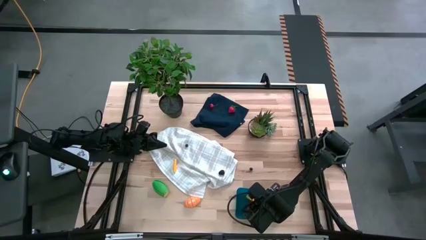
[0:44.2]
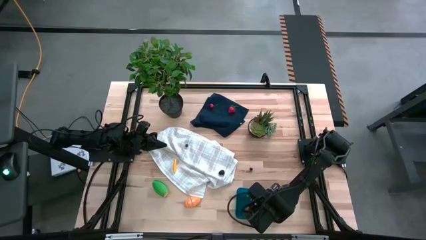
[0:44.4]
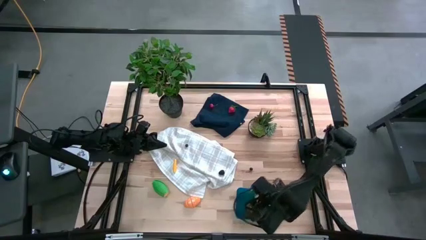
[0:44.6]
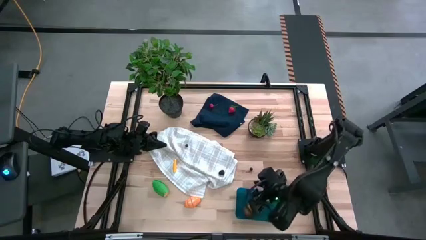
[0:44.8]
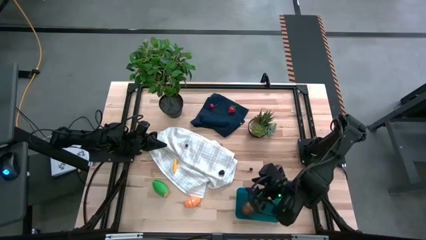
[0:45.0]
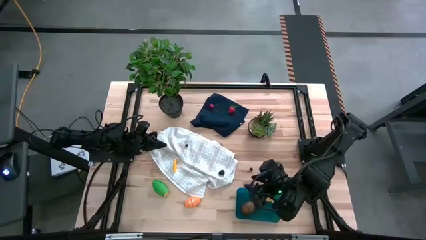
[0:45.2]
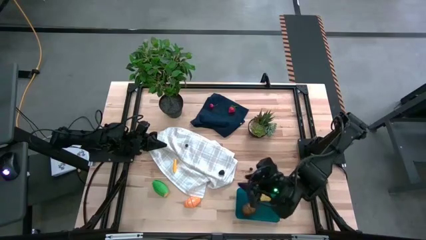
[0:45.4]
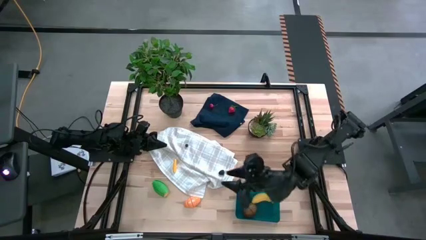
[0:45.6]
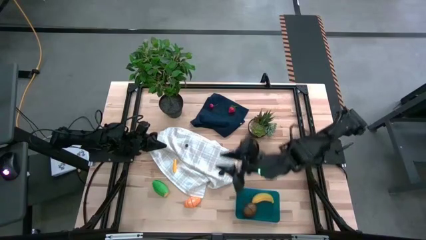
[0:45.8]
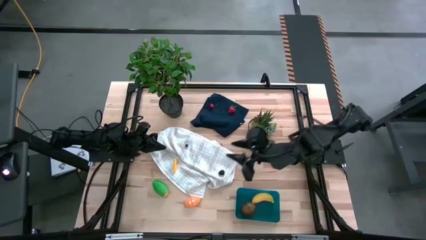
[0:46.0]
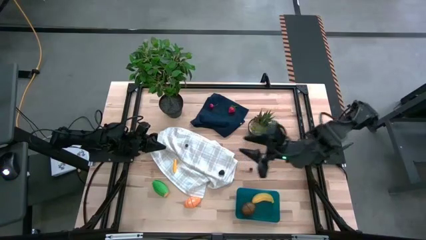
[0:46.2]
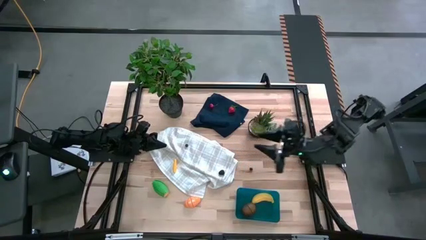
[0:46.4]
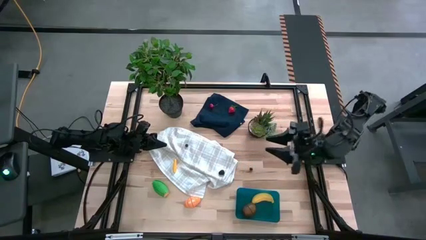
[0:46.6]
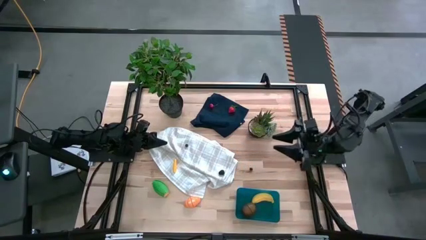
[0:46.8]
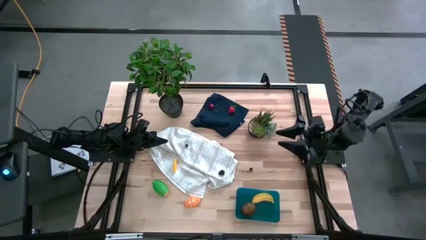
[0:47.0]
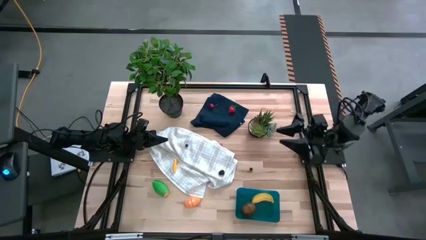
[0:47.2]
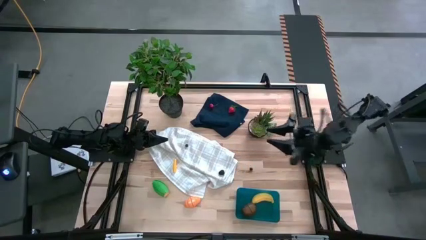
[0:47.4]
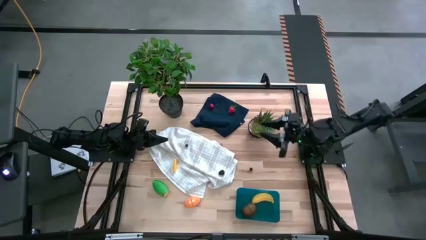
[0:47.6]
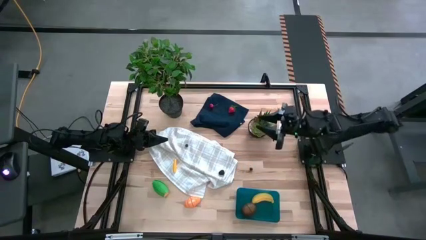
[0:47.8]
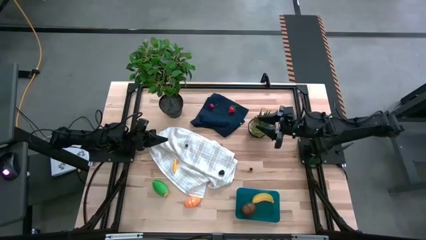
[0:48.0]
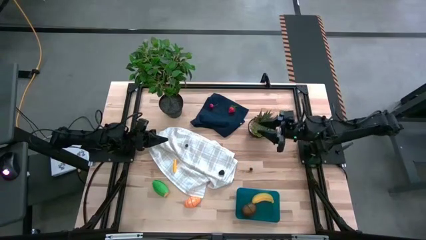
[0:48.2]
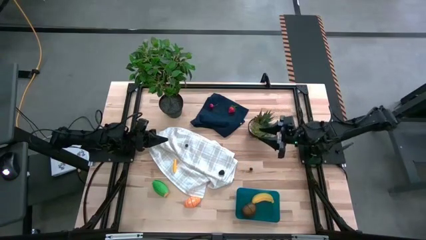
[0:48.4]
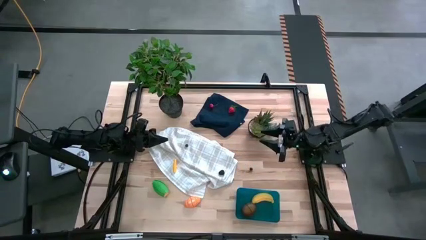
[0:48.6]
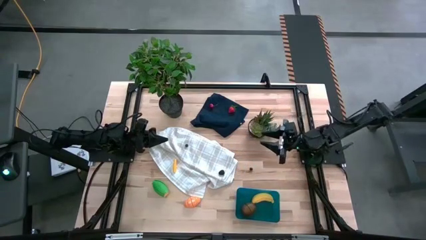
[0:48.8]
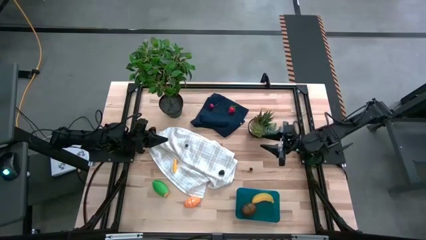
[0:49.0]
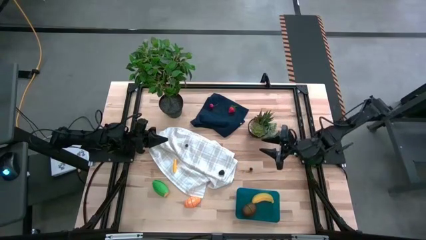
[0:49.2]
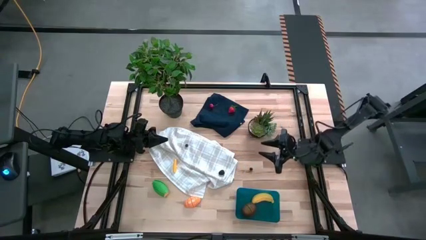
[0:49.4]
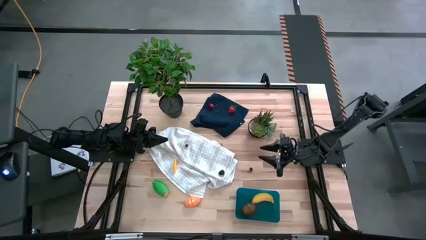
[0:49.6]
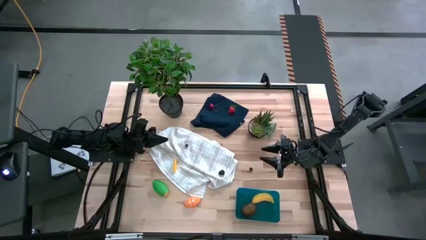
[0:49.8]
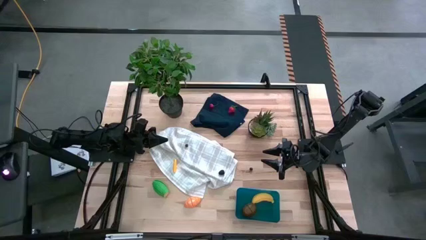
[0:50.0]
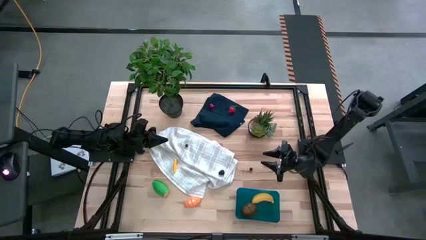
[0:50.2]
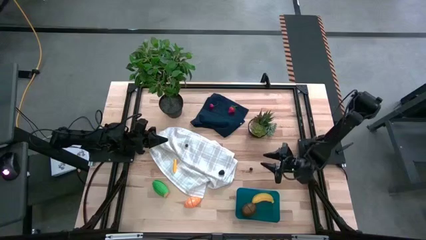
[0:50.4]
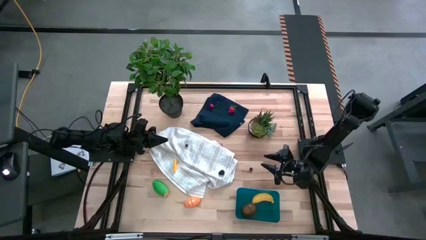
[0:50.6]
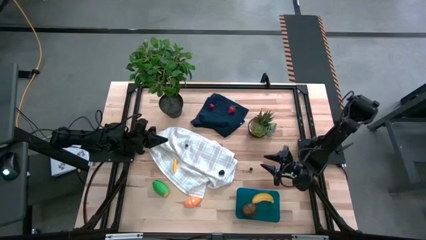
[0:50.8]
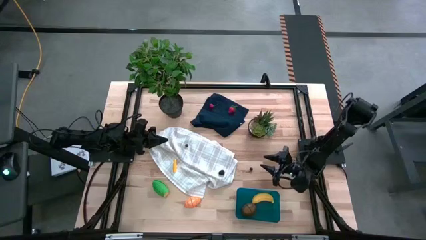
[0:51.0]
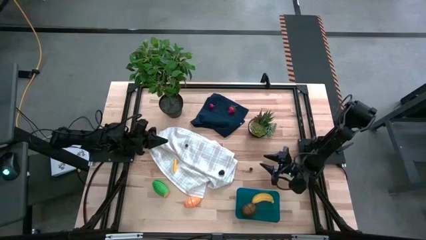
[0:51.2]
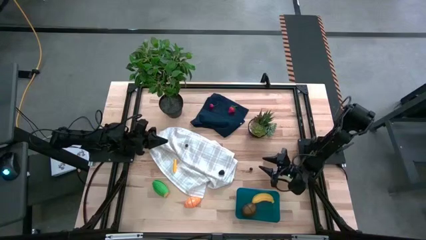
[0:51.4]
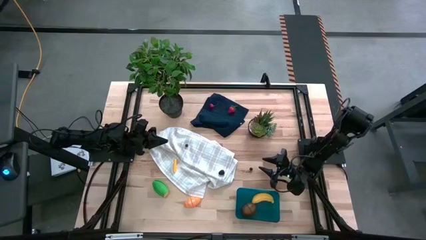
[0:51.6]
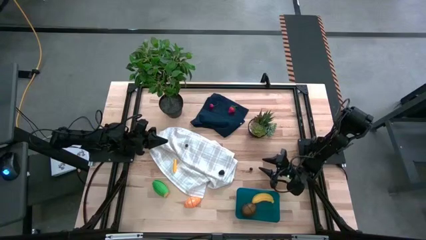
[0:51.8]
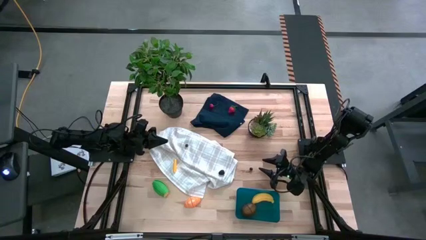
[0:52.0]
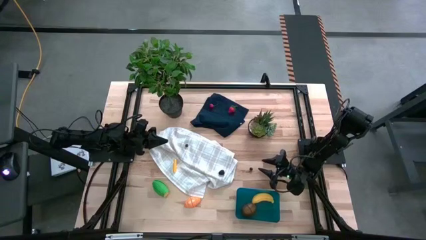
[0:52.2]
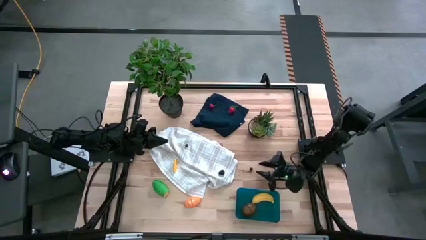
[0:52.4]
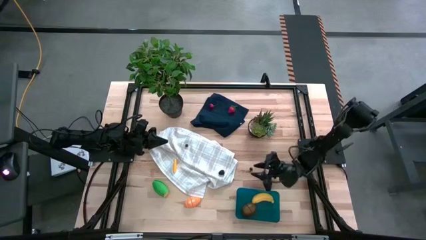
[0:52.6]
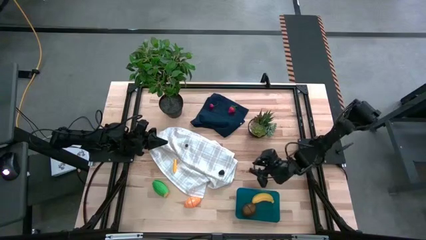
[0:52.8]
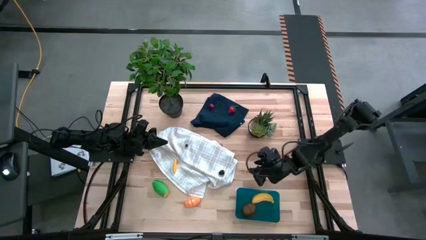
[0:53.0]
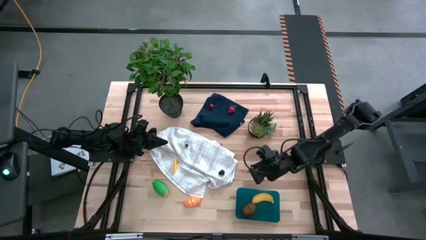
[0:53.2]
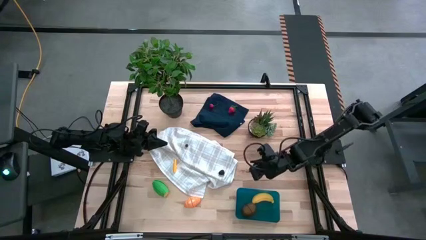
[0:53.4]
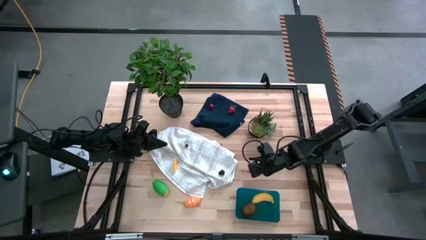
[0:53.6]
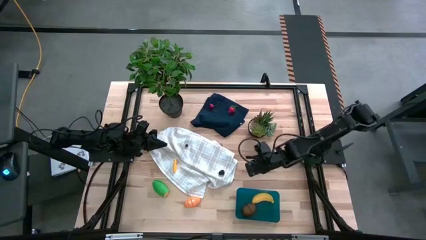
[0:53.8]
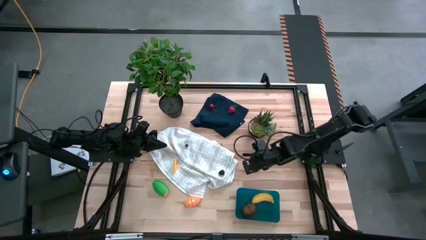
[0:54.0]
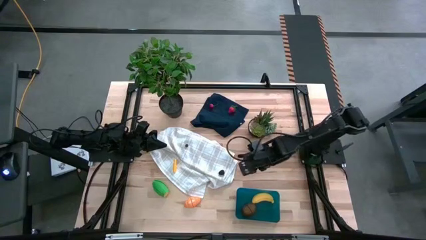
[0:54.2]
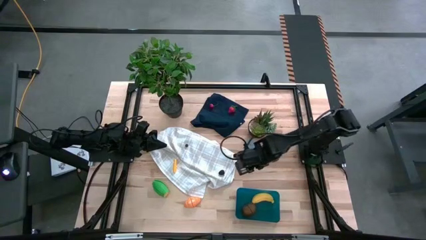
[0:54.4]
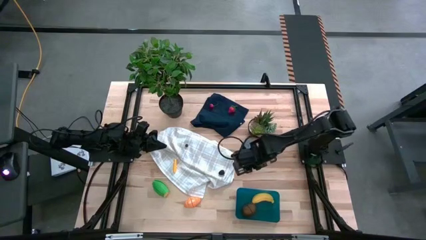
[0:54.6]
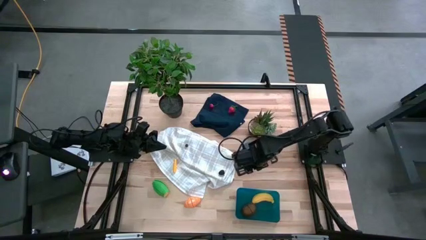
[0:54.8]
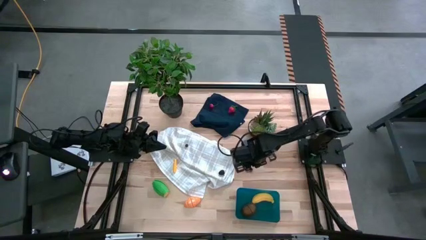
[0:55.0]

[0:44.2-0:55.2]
Task: Pick and placing Produce into tupperware
Put the right blueberry into the bin

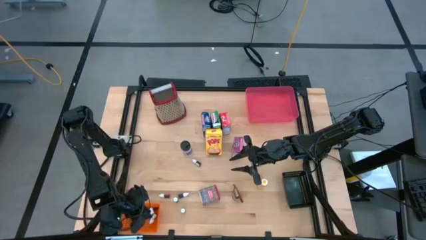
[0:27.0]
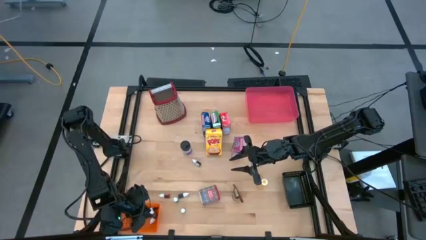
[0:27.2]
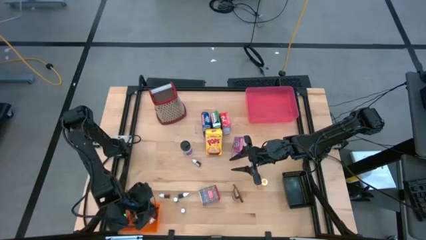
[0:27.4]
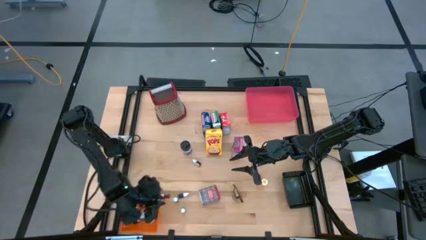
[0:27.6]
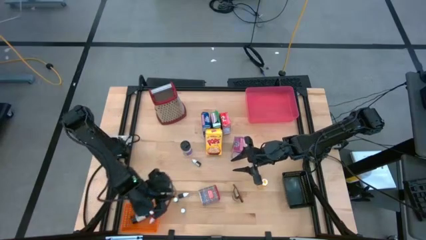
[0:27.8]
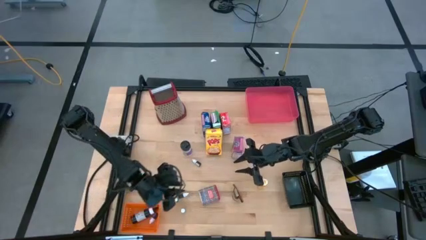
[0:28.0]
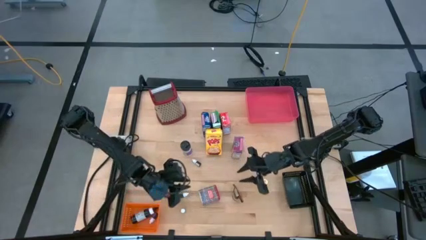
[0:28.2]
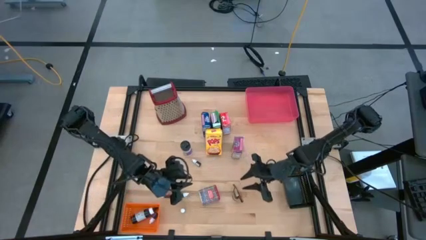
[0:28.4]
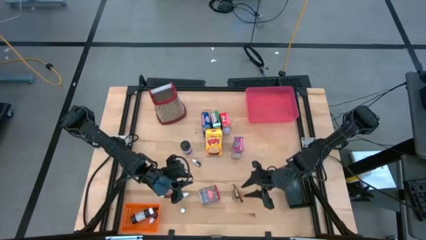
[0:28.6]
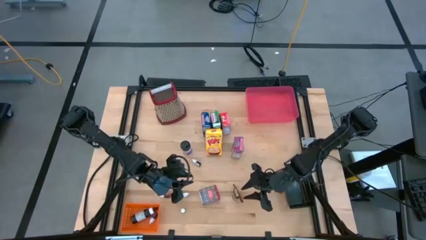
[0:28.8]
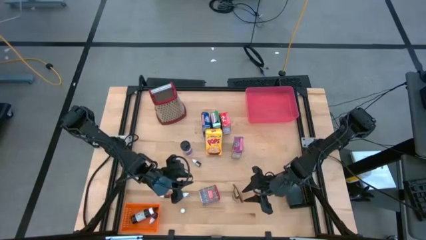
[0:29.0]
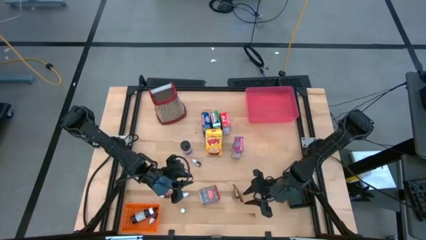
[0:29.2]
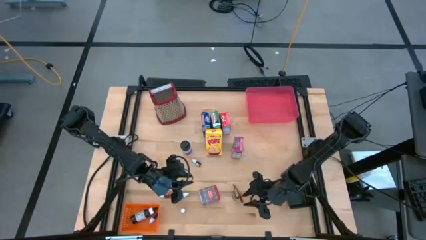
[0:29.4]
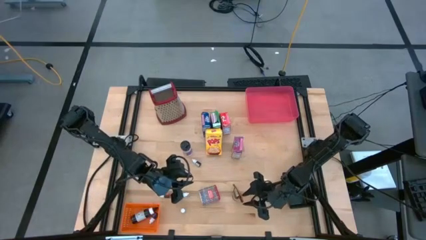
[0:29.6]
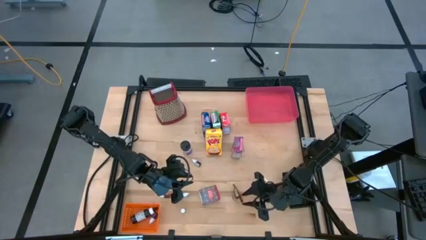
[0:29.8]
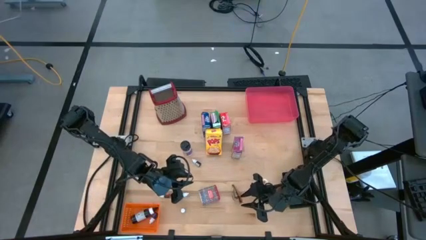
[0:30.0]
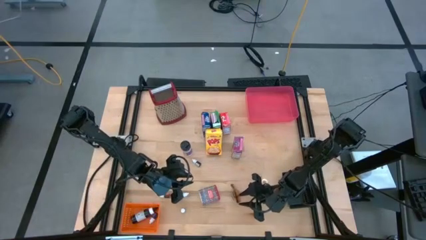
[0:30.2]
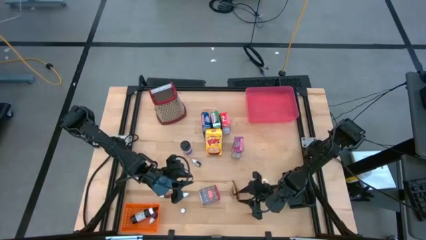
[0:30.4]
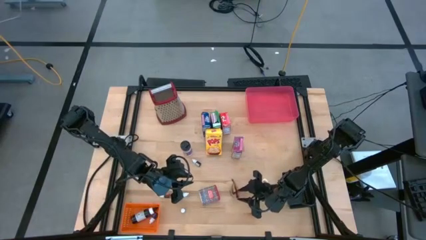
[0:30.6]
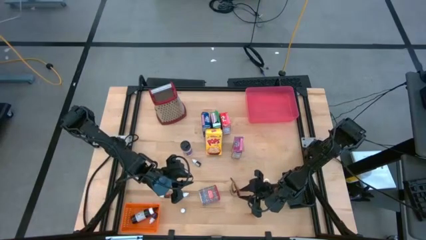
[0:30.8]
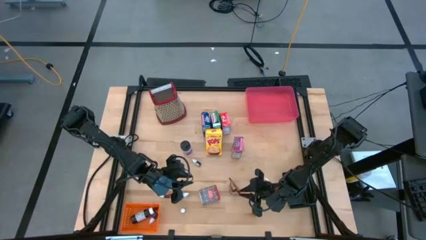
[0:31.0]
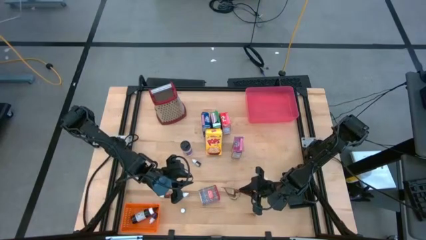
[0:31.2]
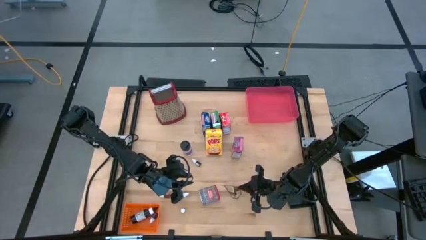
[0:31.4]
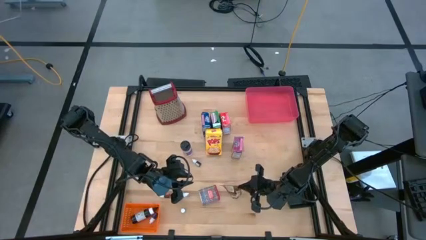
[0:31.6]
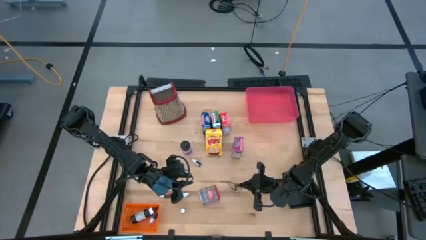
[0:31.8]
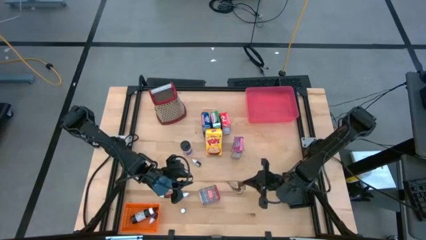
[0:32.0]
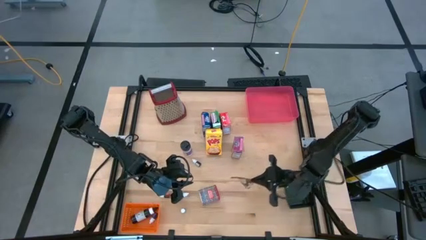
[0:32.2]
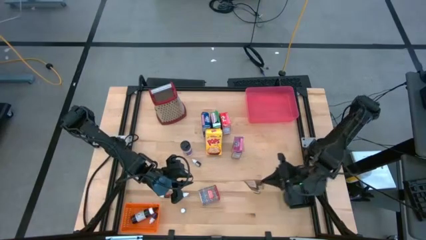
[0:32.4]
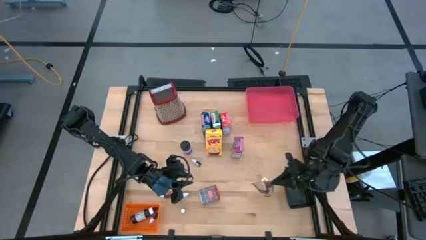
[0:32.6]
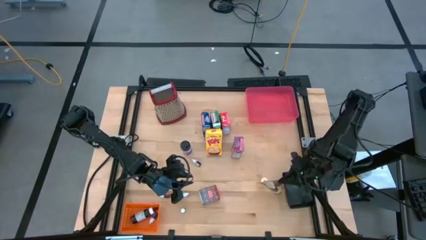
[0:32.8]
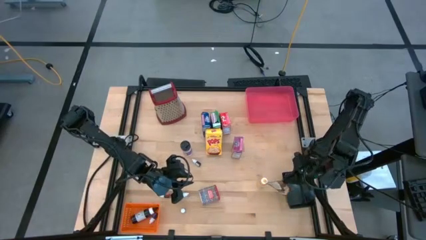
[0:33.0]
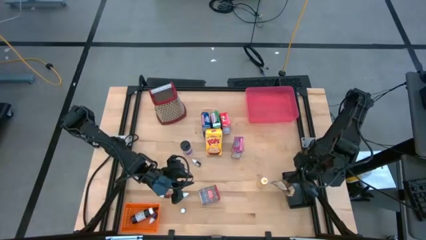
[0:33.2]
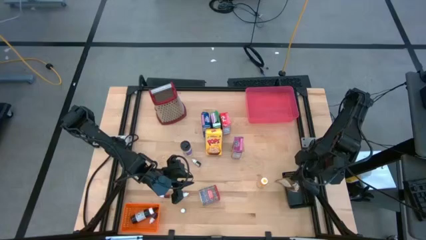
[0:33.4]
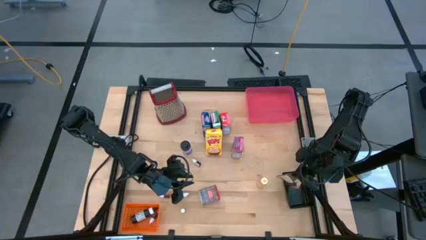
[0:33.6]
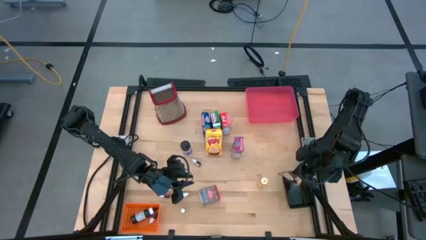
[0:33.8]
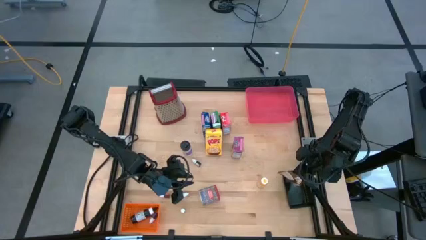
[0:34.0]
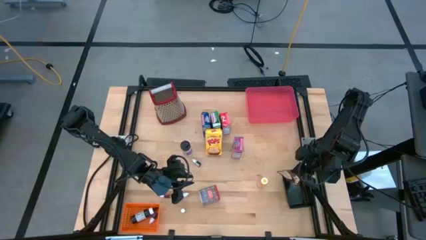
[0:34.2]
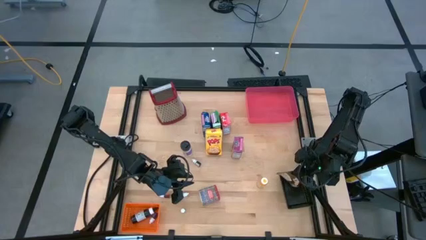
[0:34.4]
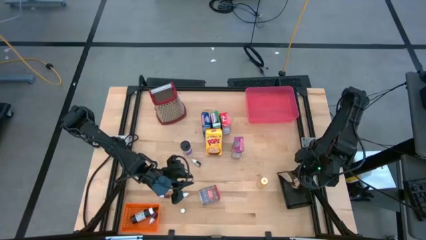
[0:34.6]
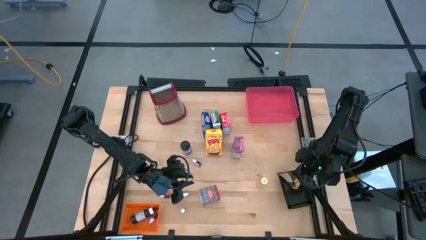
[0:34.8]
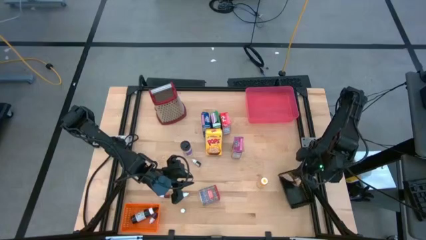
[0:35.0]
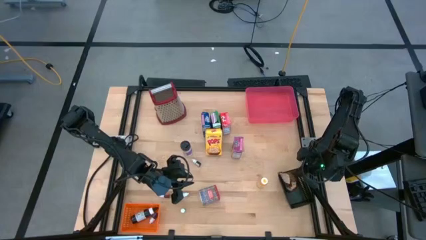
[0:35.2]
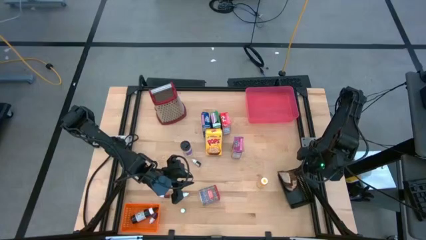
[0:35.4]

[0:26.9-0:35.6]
Task: Pick & Place Kitchen Items
Put the orange seasoning into the black bin
